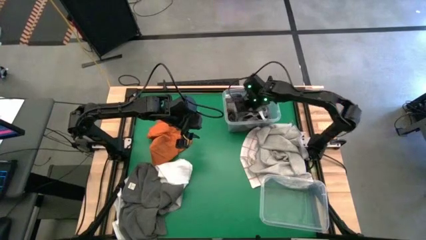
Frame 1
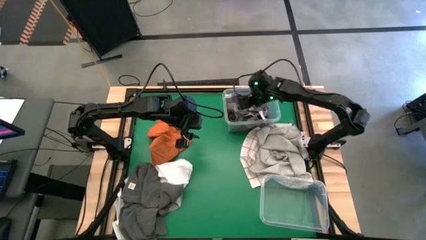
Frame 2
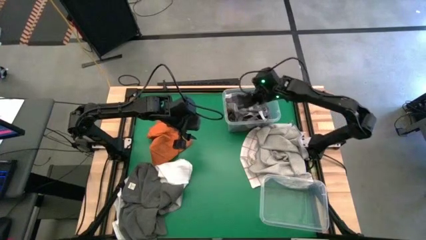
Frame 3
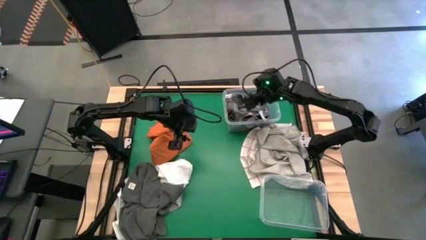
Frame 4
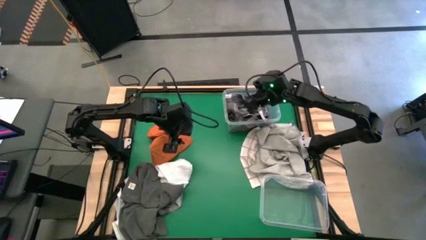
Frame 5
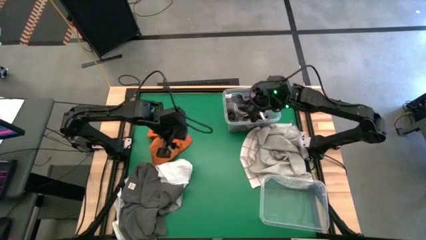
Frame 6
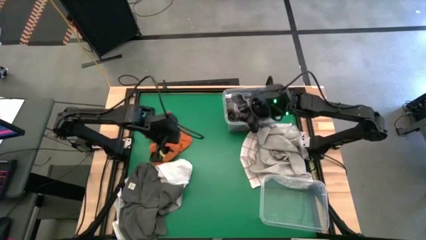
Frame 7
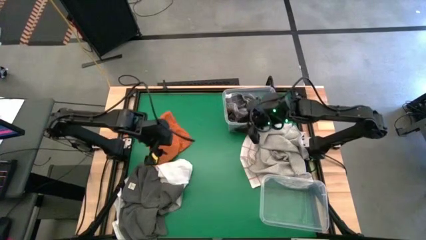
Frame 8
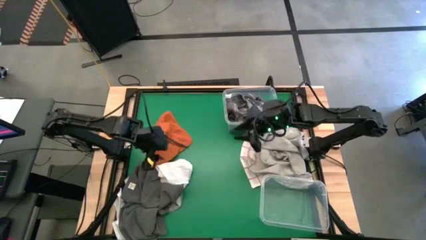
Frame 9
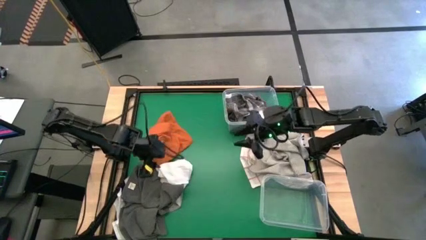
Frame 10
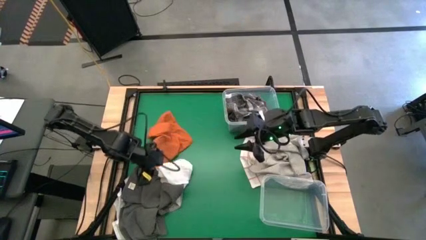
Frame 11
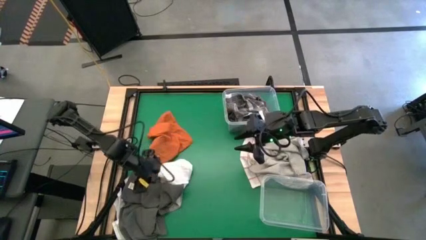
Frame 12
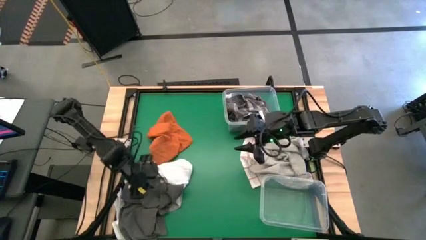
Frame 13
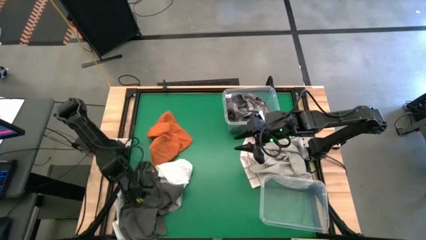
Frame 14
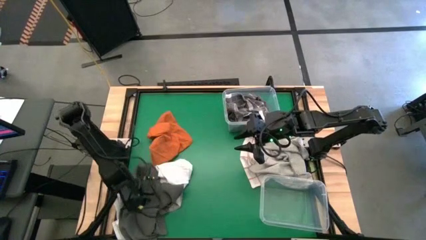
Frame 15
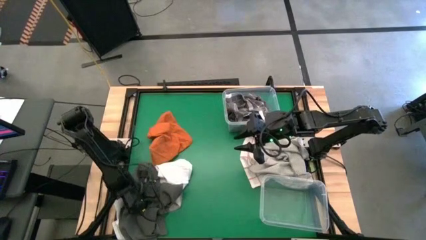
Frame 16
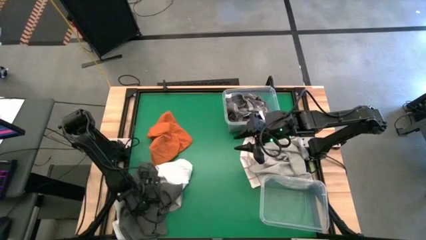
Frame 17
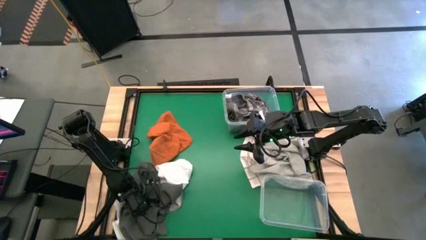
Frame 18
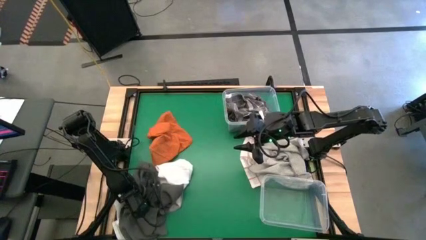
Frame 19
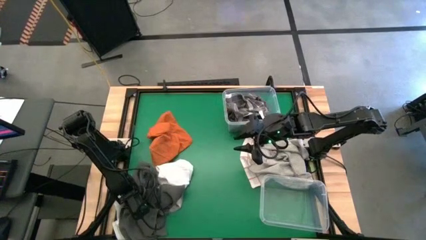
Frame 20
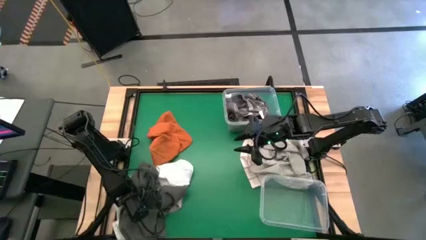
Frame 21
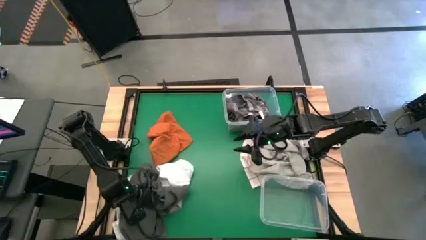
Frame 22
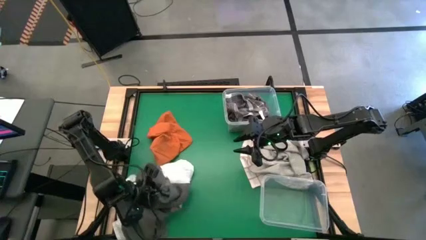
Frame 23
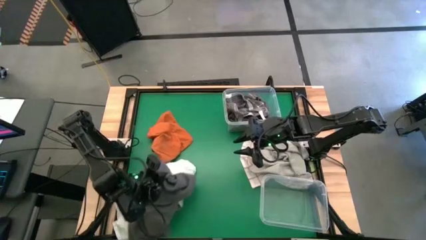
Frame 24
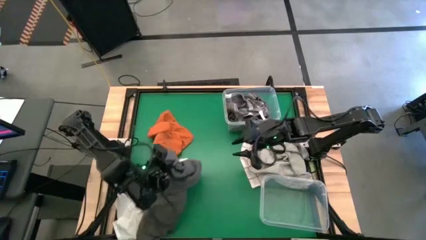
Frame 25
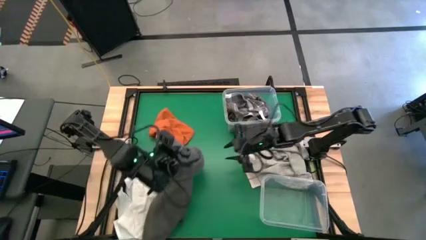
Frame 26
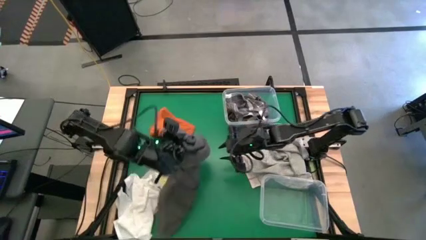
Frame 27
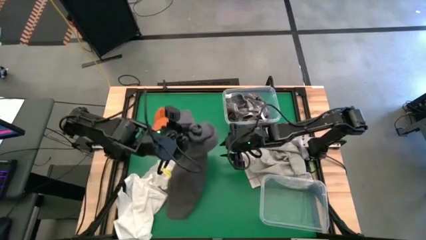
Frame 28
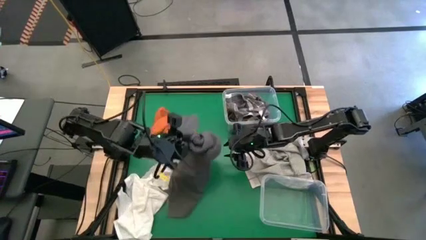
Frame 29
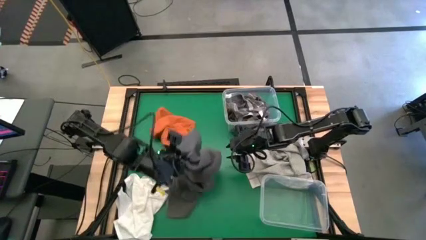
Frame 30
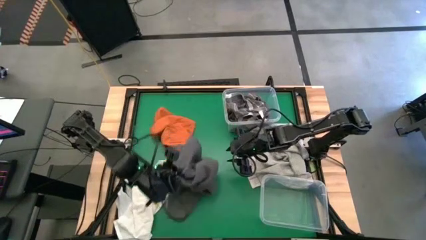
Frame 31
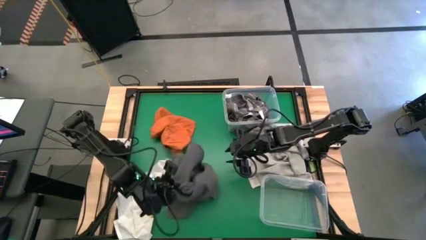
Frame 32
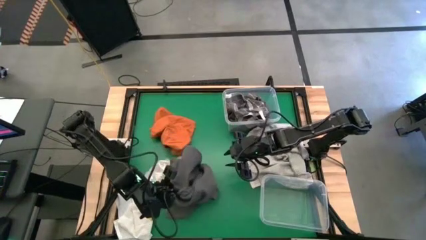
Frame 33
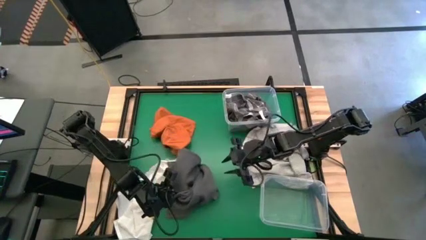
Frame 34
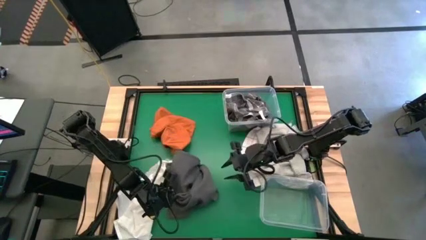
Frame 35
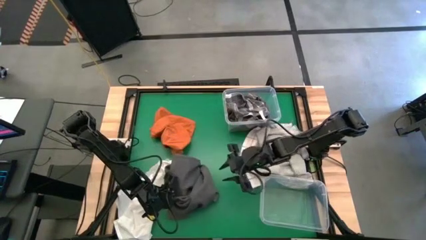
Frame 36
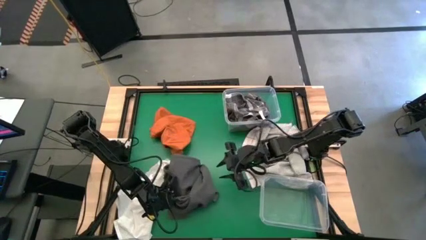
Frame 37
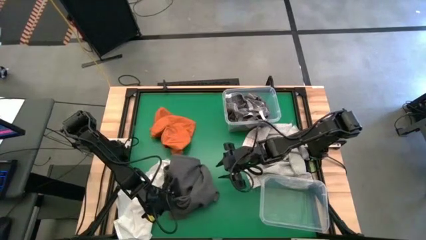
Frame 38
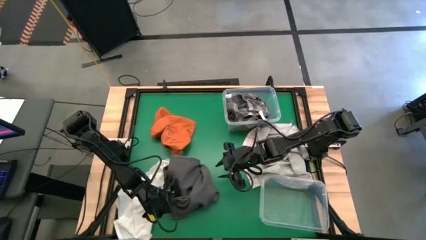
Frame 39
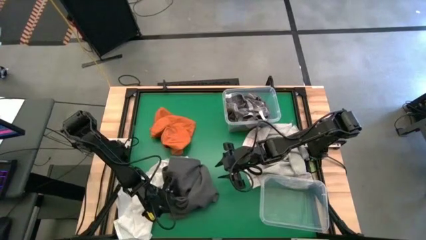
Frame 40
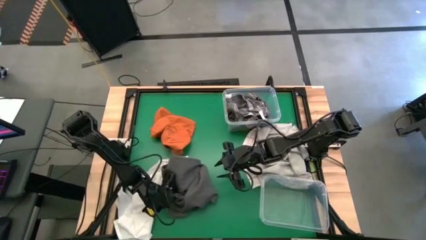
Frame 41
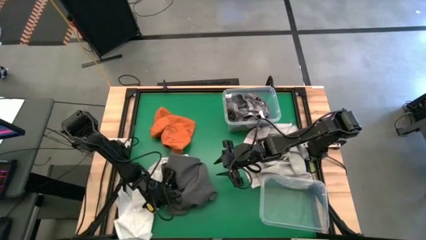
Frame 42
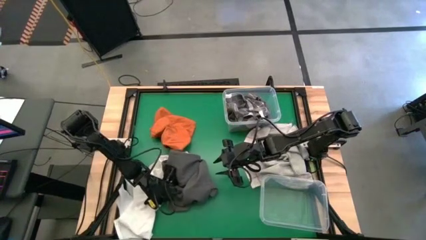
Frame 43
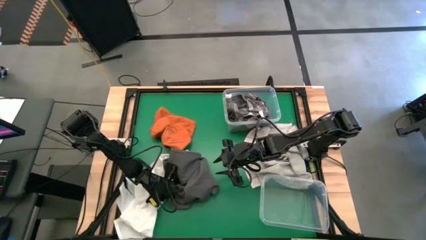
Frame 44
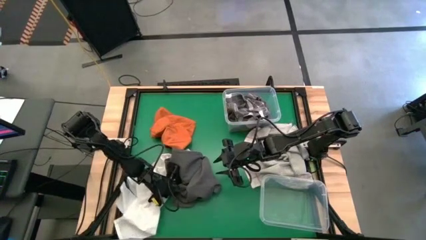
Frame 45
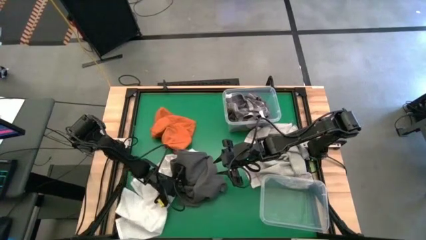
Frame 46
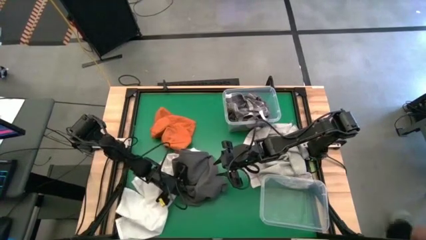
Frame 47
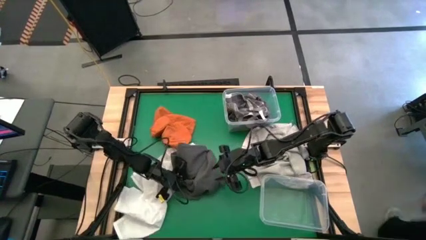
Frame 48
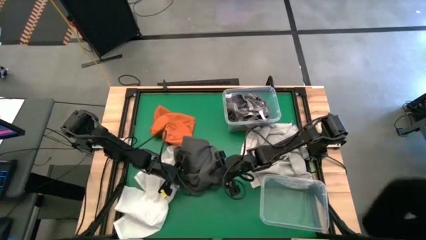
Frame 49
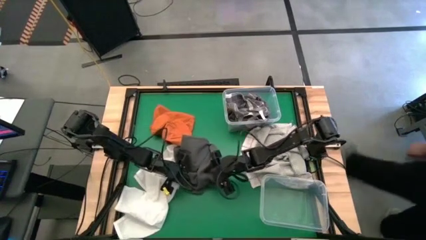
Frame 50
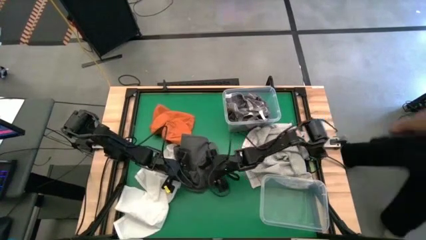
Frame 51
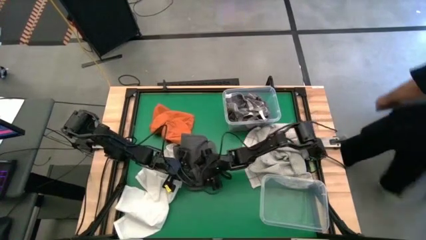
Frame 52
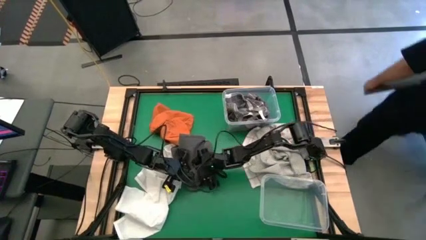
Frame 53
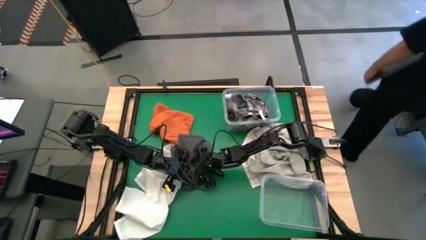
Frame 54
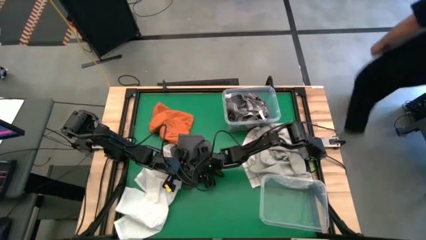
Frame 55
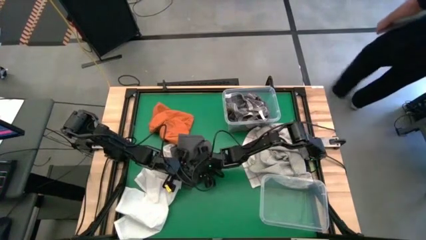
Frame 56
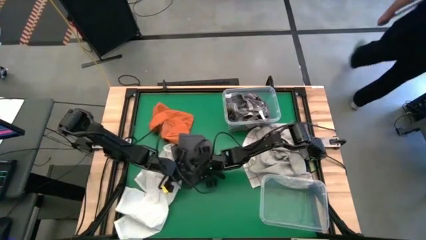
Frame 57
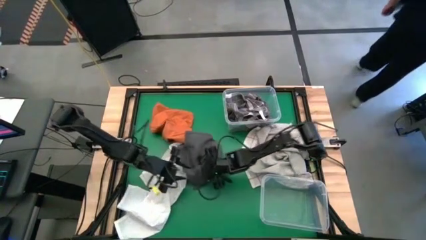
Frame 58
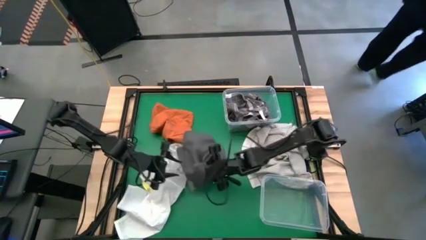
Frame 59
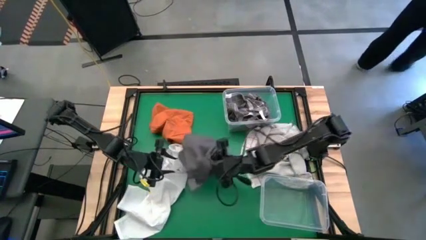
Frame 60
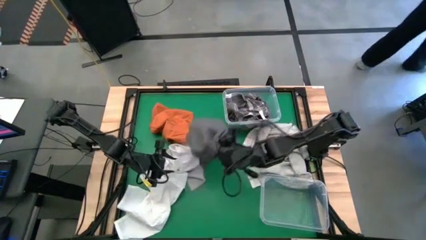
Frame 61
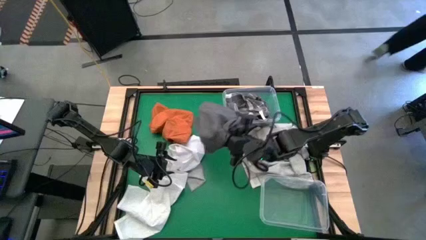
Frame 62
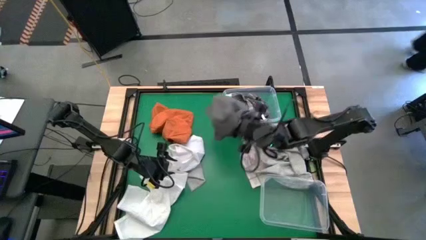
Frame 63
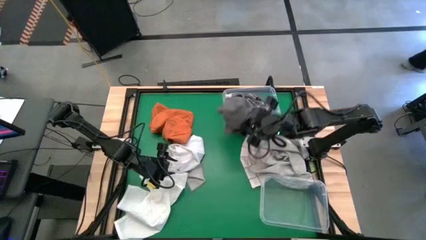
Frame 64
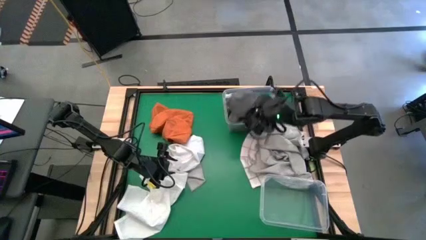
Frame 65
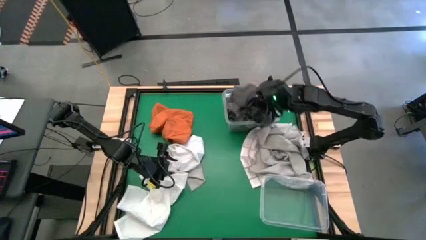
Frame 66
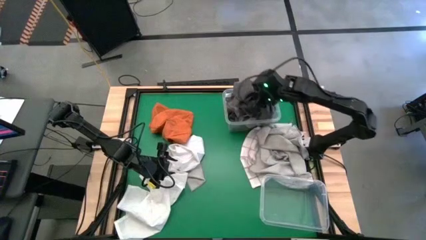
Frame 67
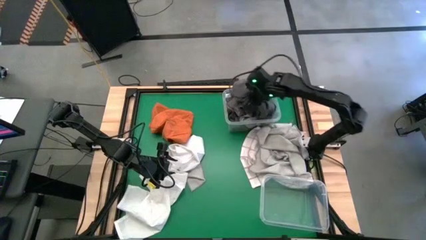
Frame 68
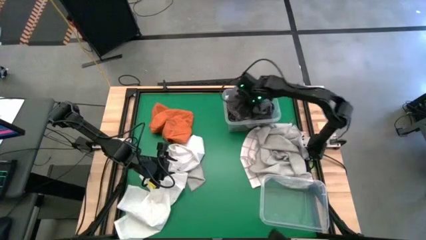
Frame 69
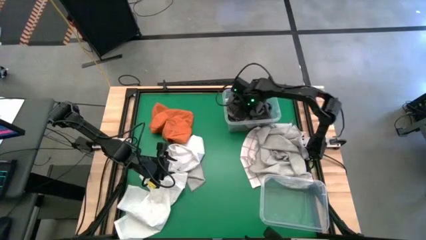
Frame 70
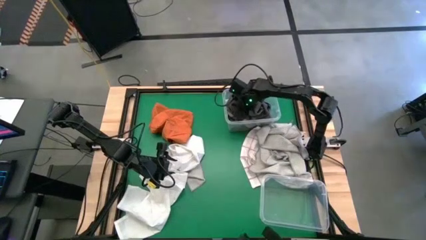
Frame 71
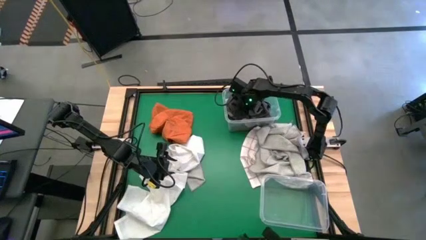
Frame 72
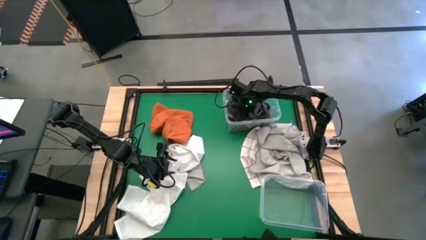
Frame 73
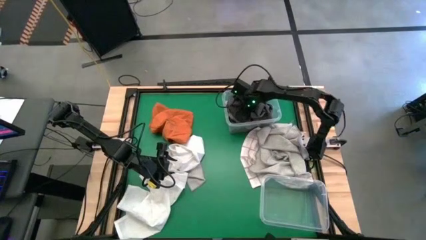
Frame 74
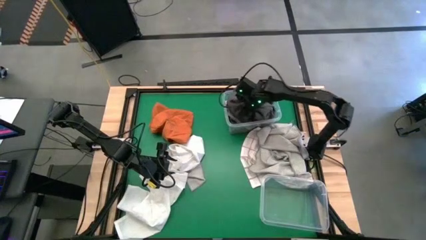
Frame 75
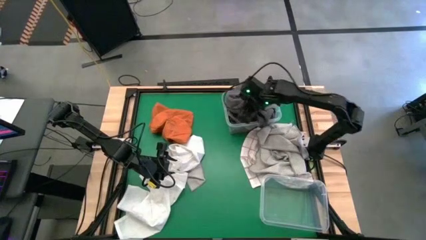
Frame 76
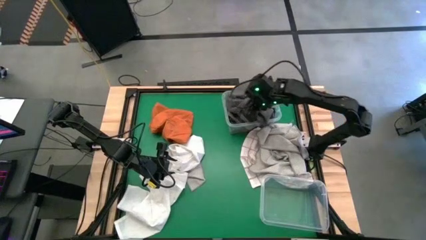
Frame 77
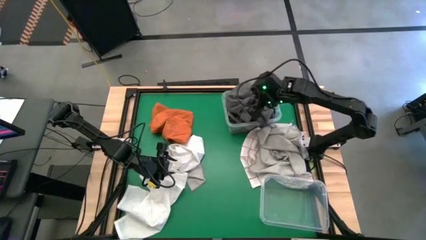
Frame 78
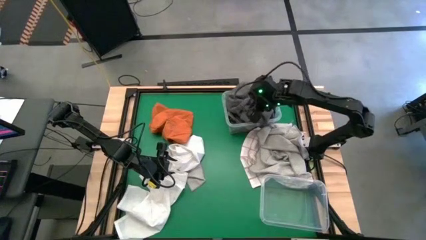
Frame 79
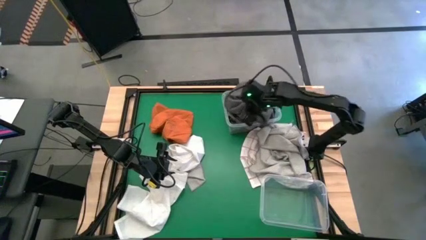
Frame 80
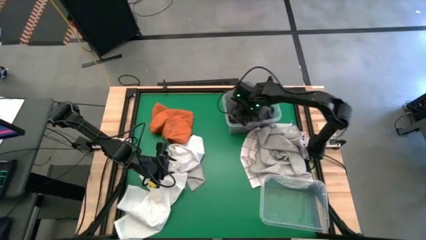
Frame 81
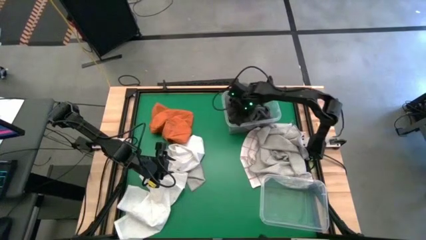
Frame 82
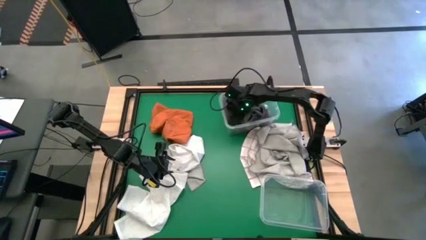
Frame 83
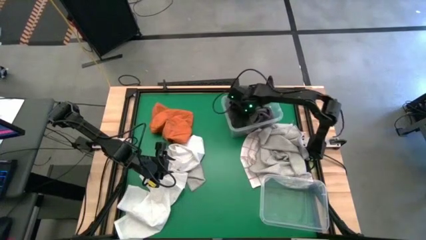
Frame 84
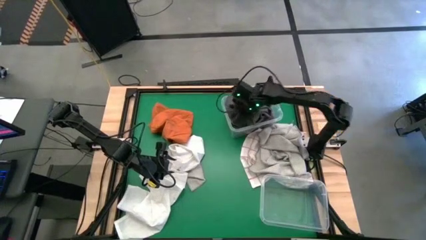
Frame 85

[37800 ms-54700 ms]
Task: Sort towels by color in basket
Put the dark gray towel into the top transparent bin
